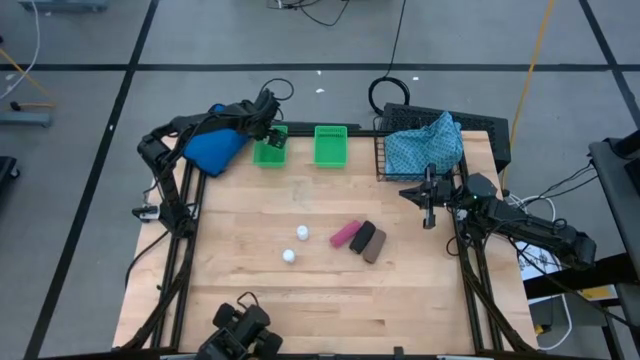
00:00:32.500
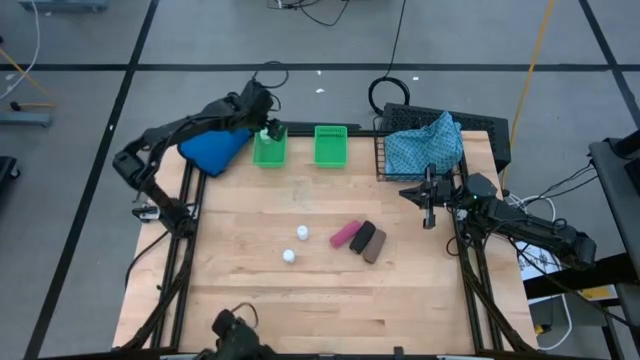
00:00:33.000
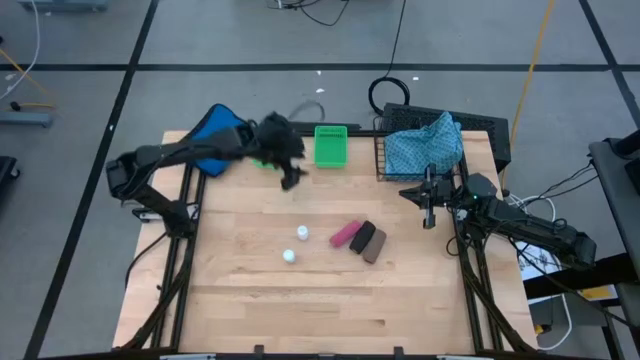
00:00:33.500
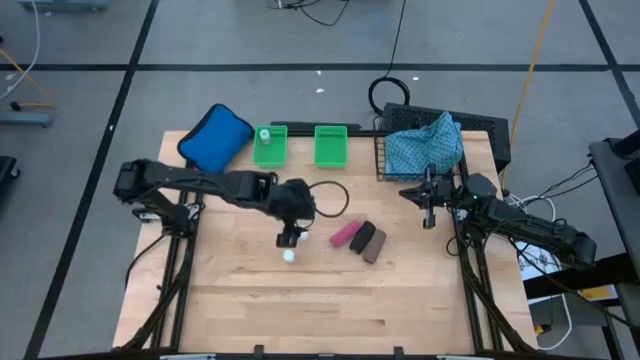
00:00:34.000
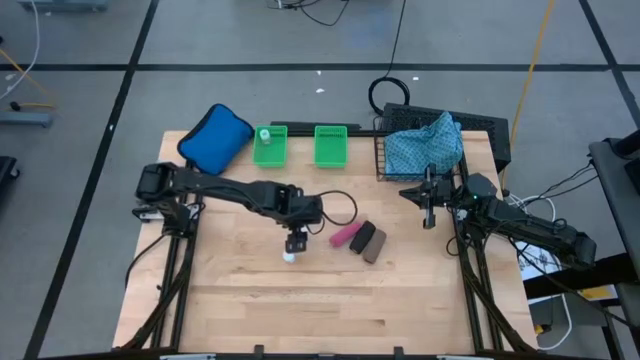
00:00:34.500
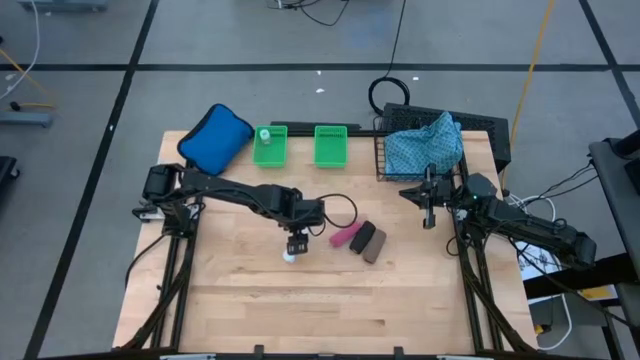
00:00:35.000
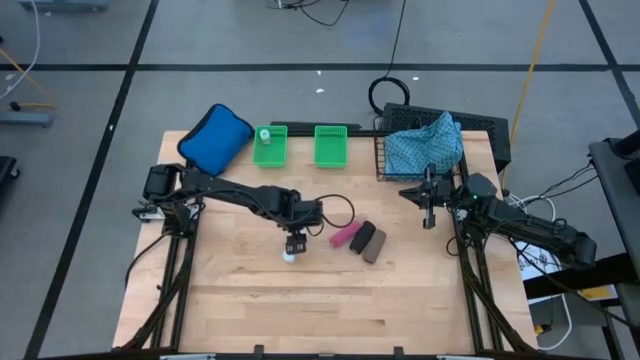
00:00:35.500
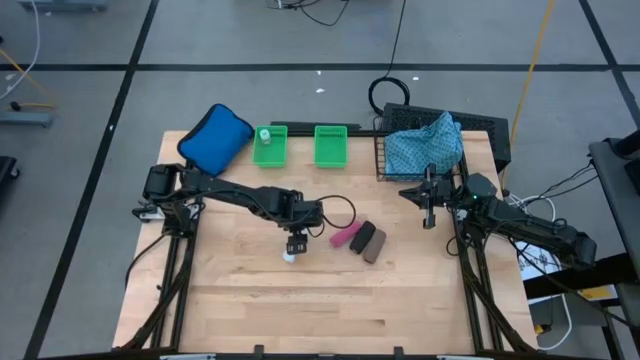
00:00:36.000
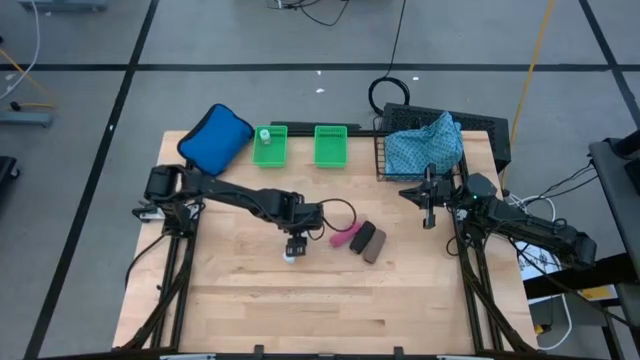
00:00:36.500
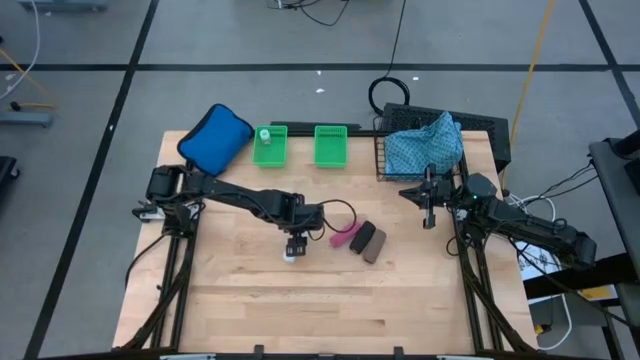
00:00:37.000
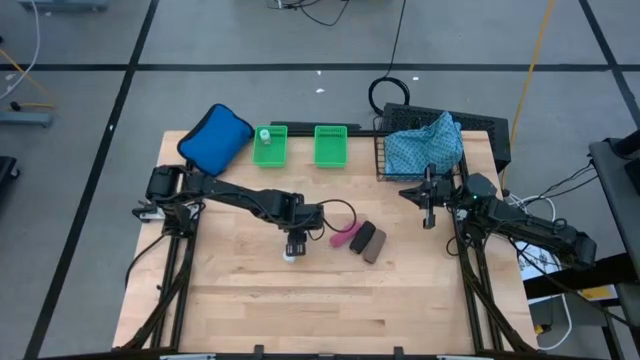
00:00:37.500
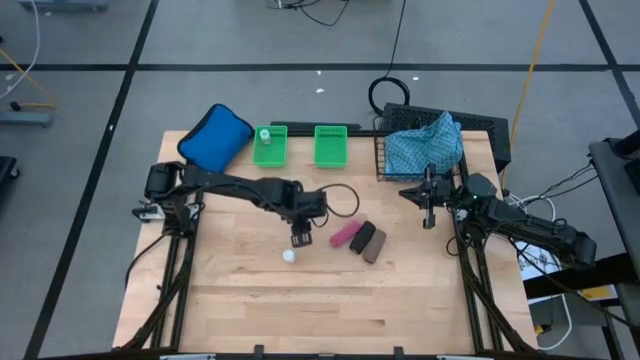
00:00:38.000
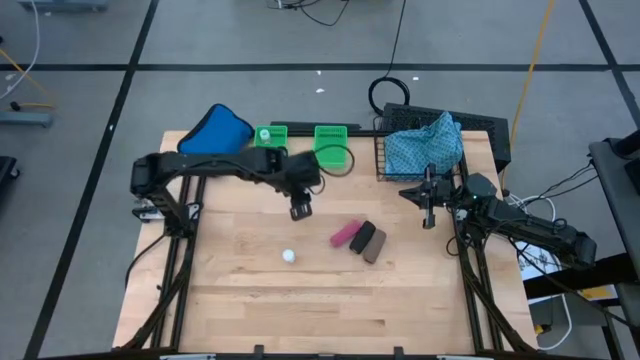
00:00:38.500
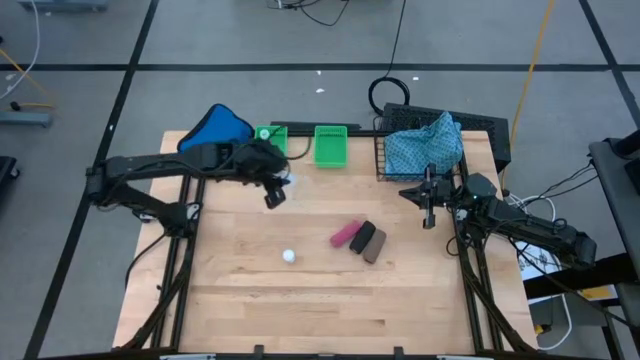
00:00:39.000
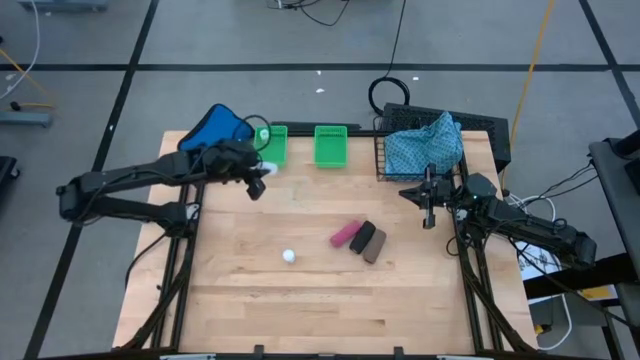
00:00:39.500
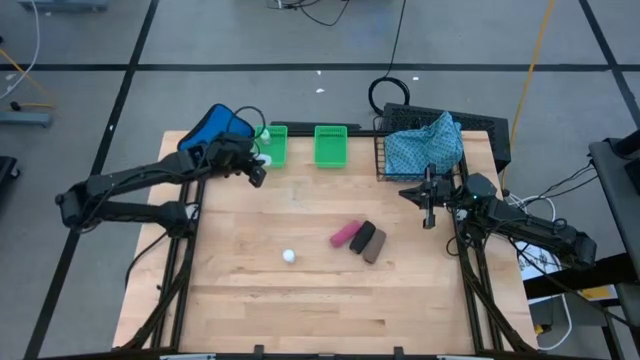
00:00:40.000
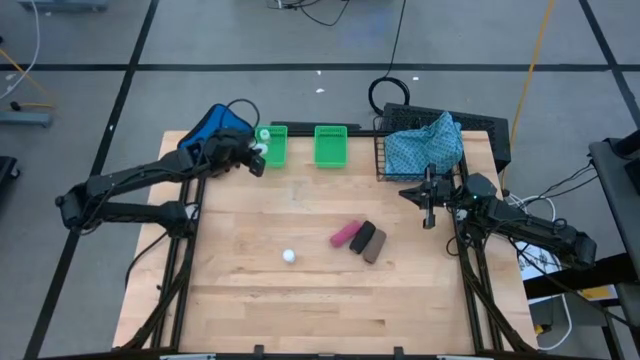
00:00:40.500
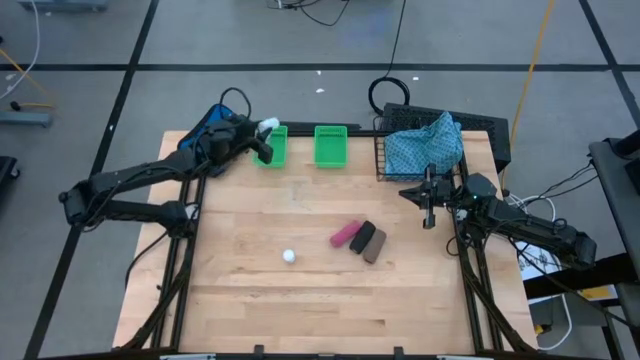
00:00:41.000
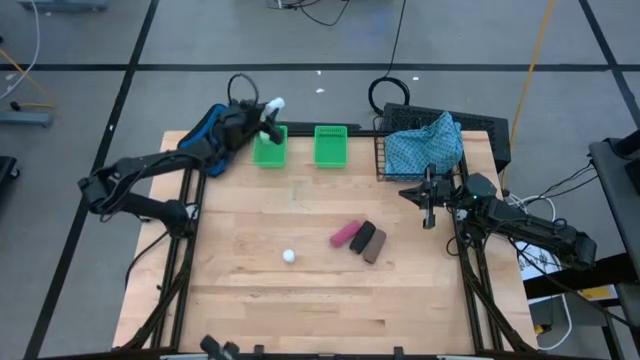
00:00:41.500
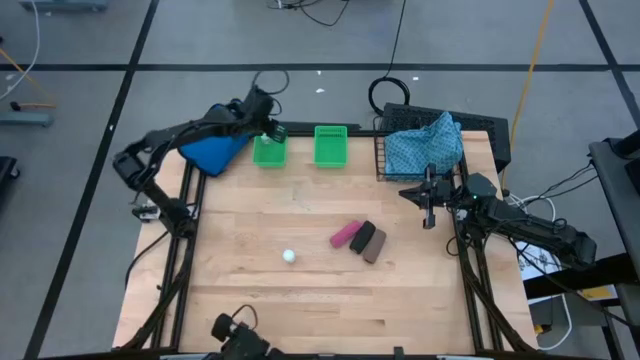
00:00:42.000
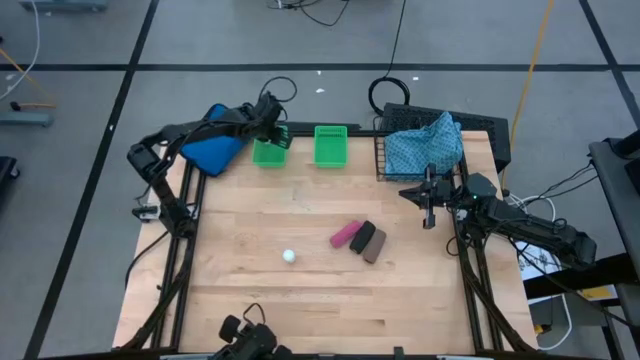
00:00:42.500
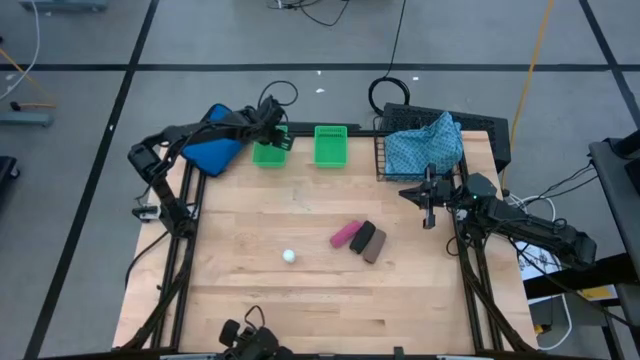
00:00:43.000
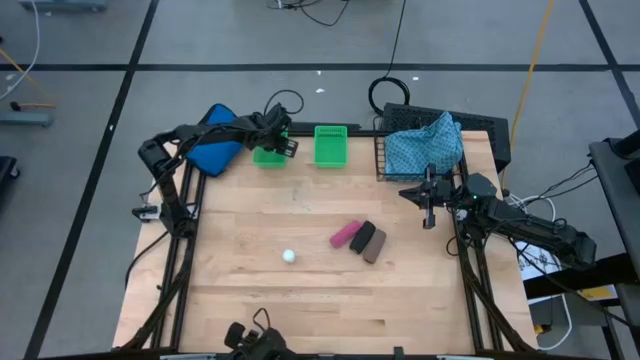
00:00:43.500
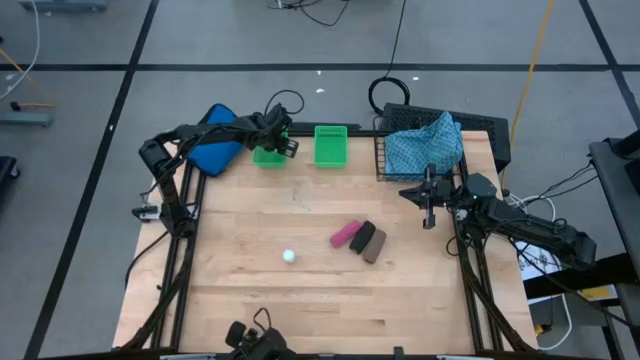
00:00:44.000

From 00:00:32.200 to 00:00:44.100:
Task: Pick & place medical supplies in basket/bin
Put the transparent pill bottle into the left green bin

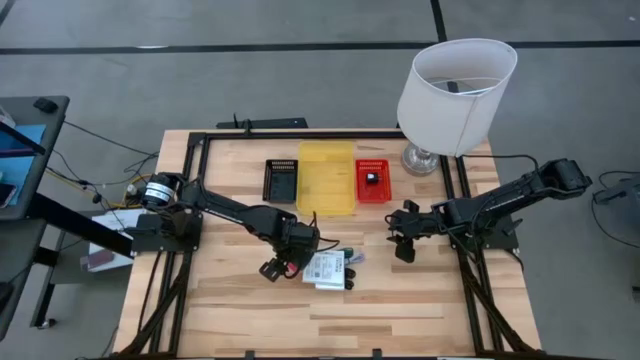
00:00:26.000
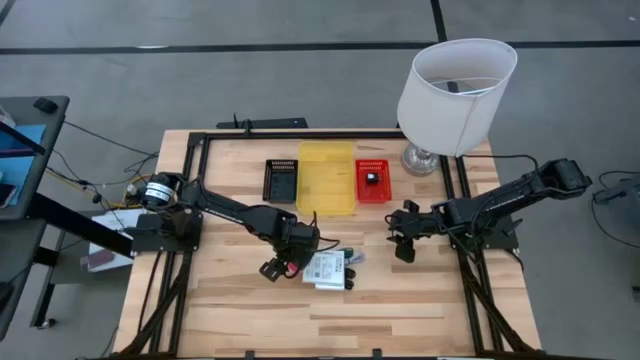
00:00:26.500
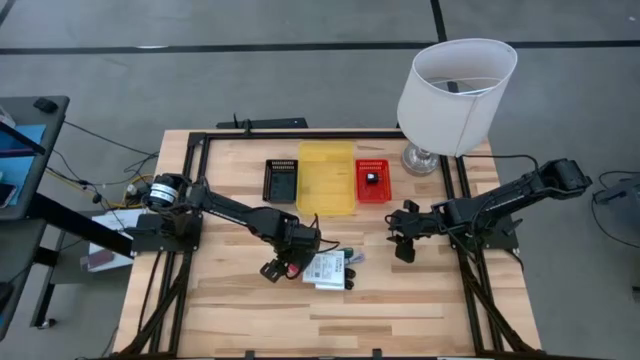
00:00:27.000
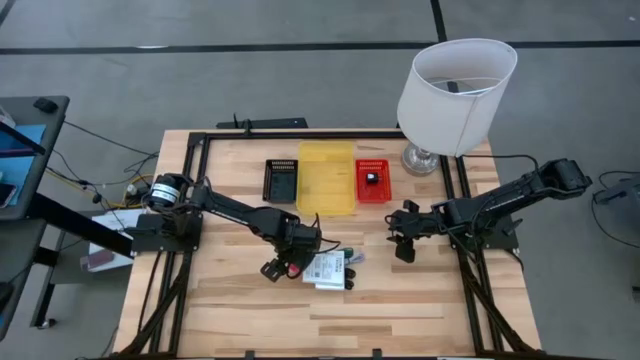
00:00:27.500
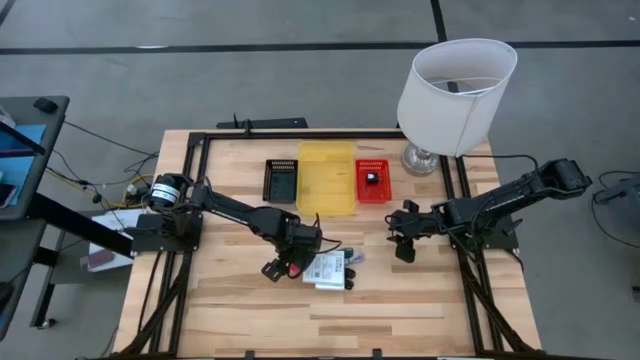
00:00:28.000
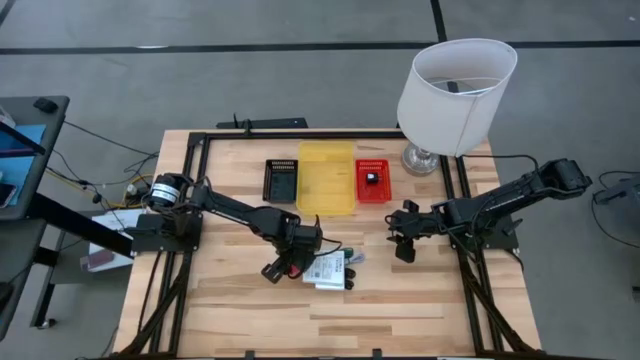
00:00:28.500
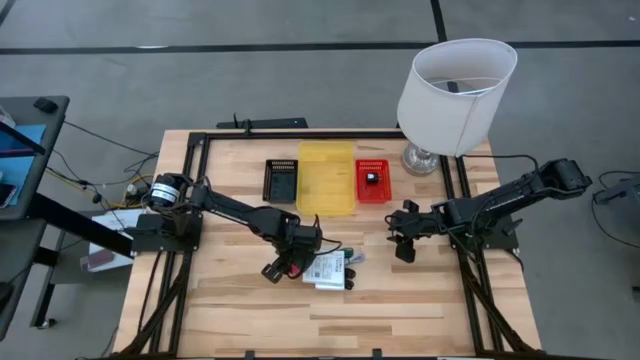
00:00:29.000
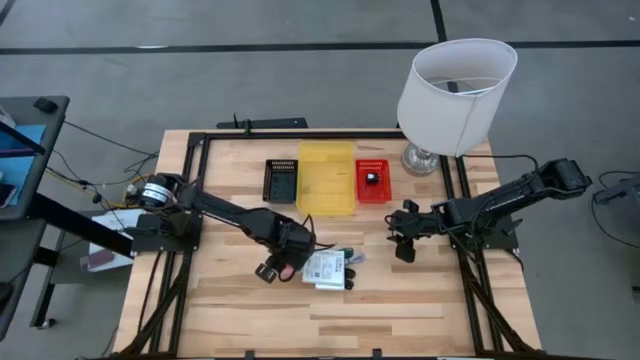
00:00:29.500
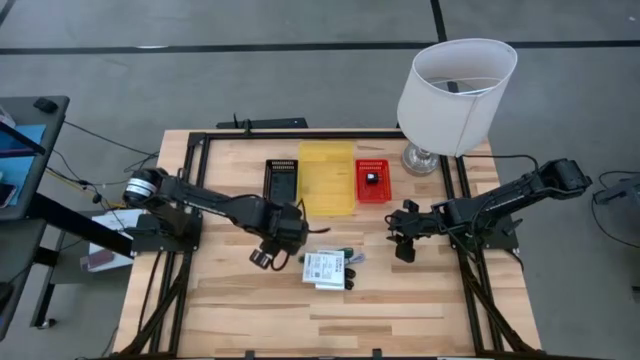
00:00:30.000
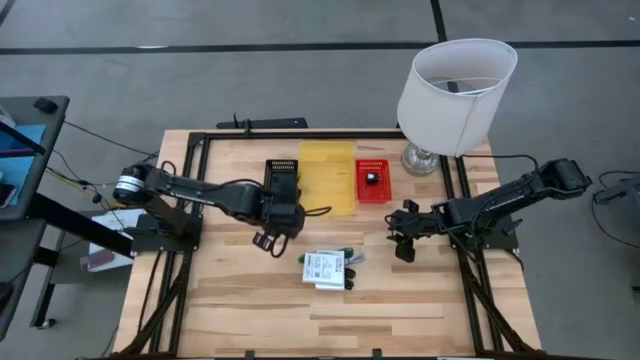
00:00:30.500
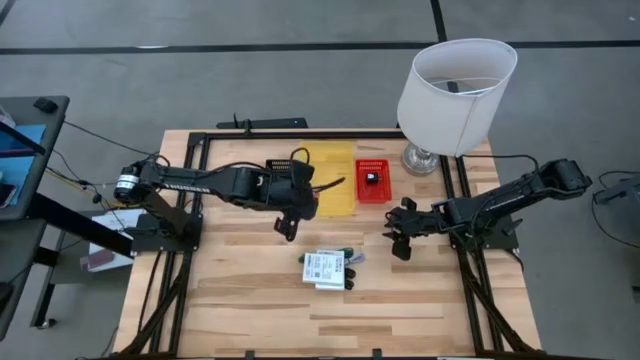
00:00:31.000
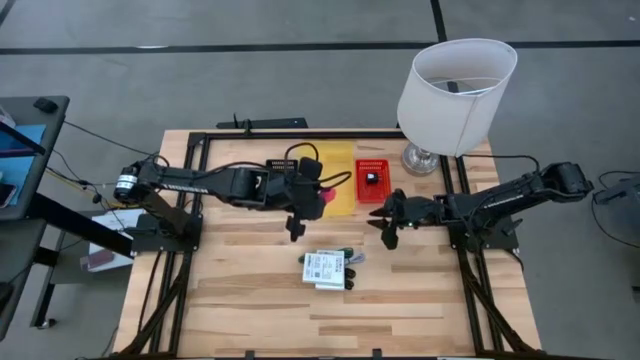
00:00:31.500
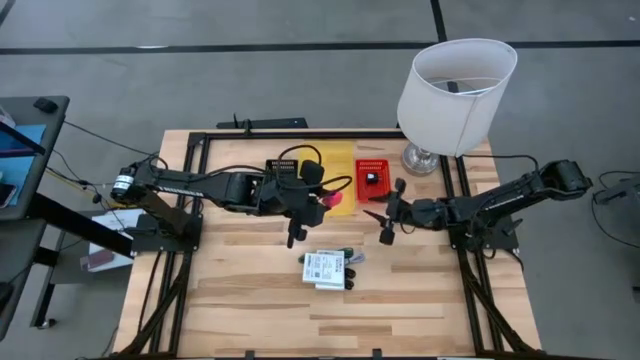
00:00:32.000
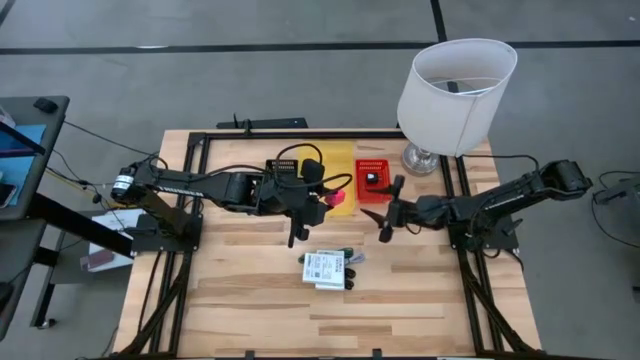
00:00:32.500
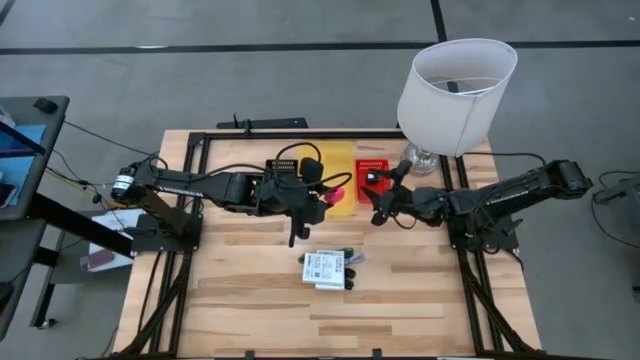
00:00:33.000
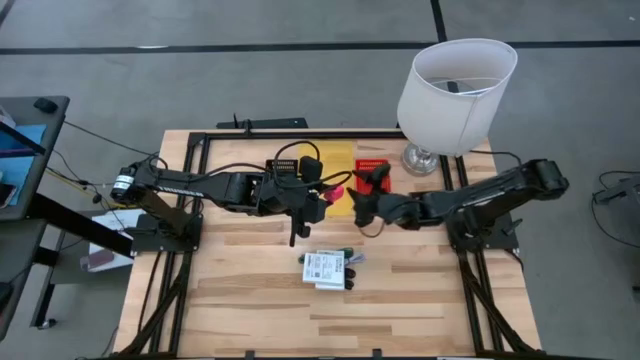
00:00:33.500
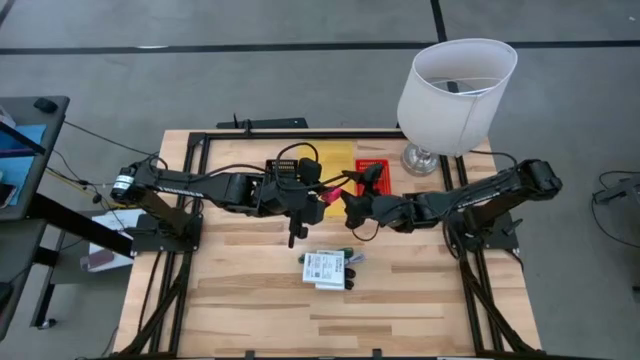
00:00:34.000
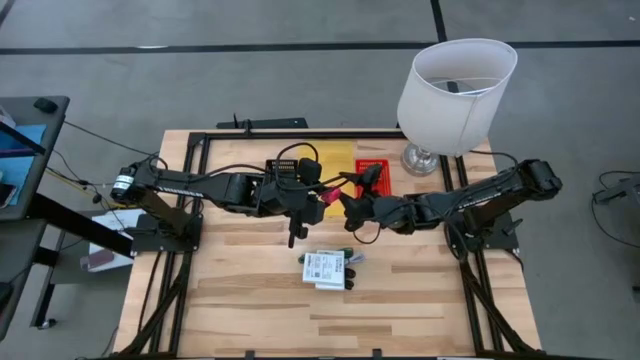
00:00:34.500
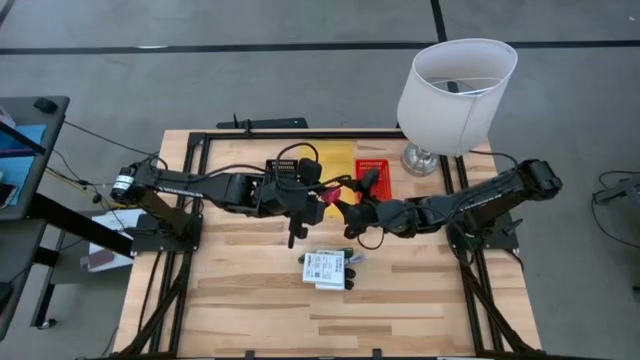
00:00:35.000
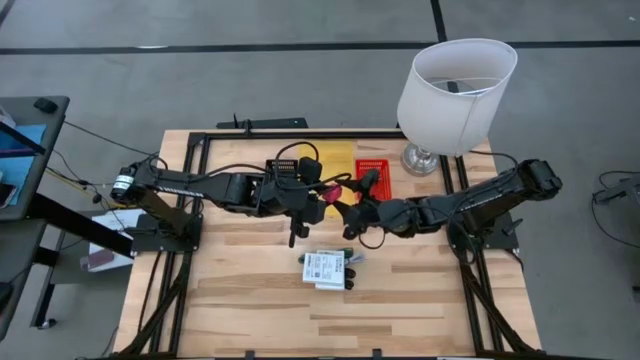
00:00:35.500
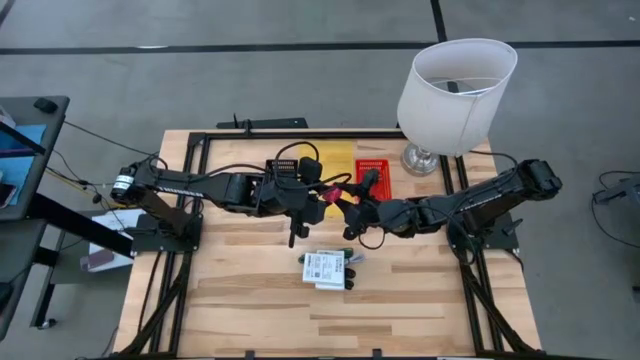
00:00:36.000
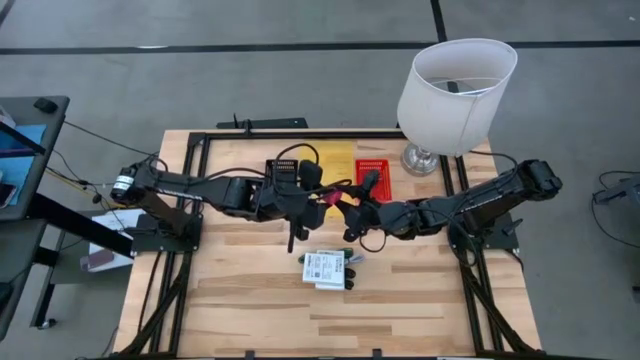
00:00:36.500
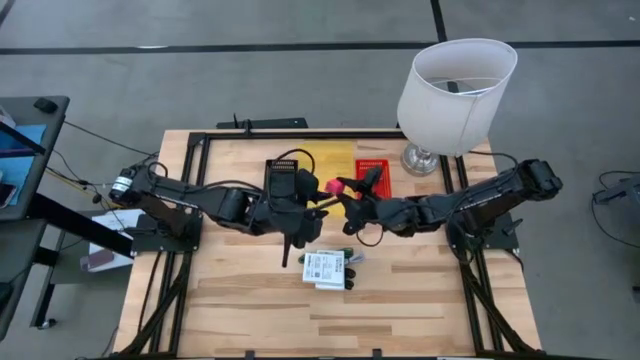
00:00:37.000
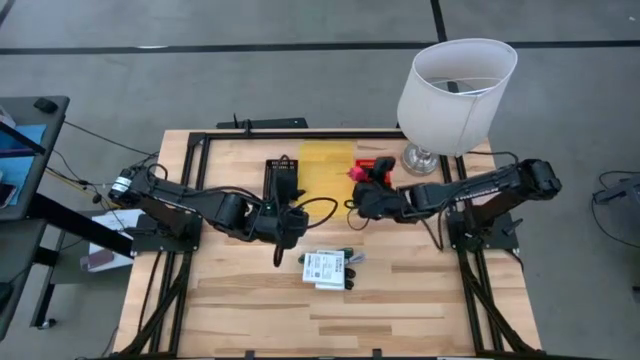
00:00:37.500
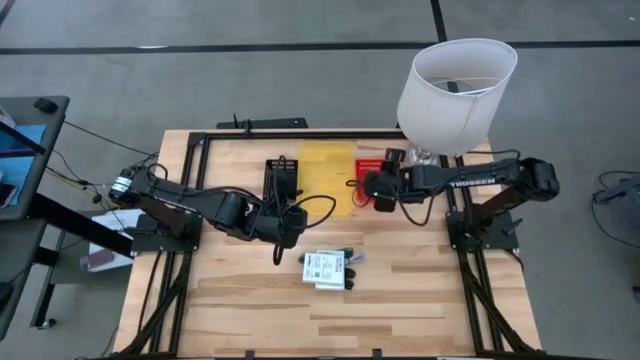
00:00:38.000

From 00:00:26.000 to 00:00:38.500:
Task: Pick and place items into bin
Put the pink charger adapter into the red bin
